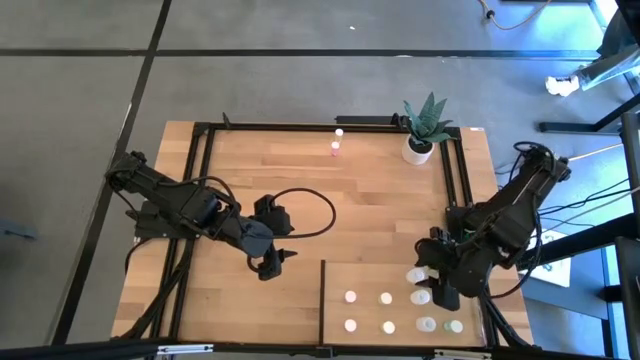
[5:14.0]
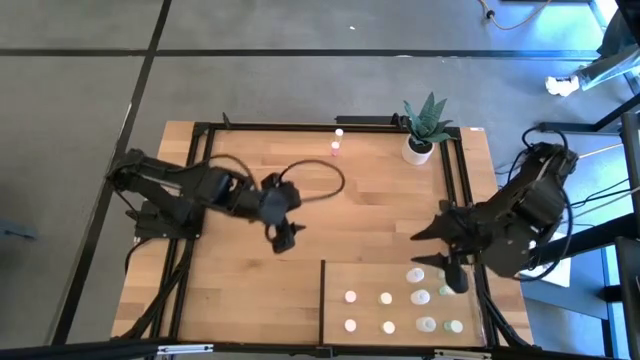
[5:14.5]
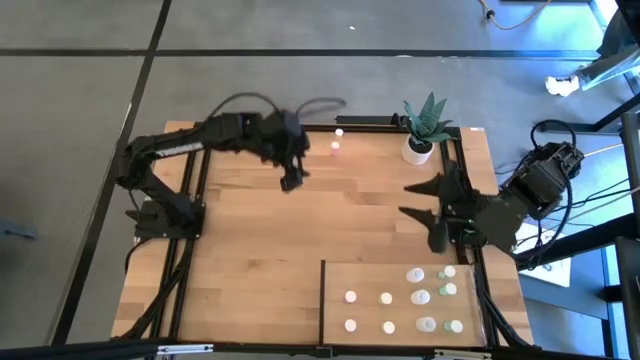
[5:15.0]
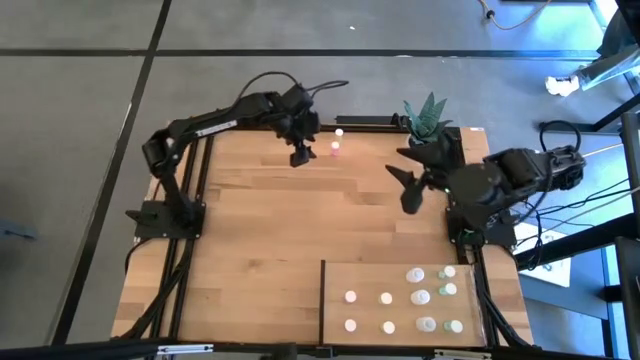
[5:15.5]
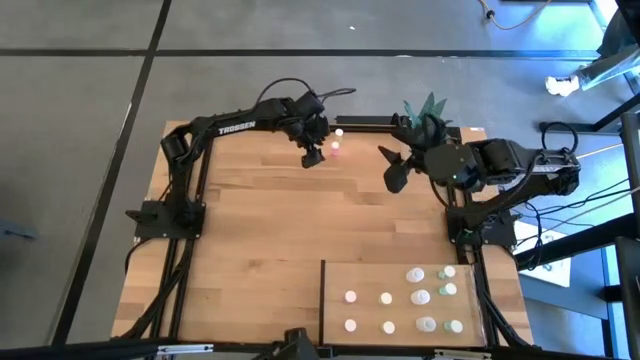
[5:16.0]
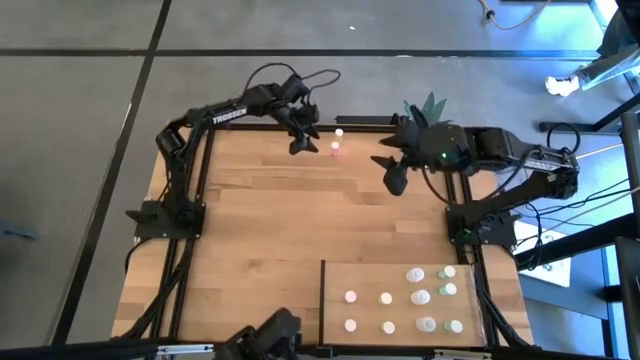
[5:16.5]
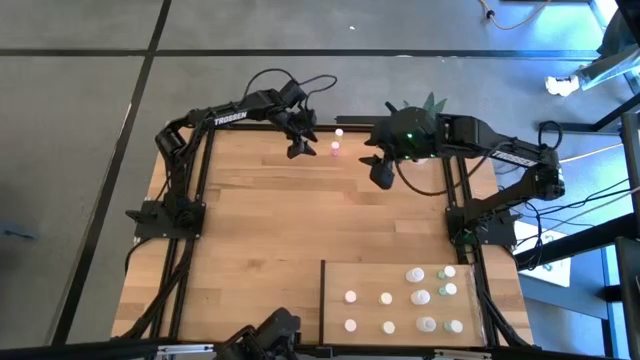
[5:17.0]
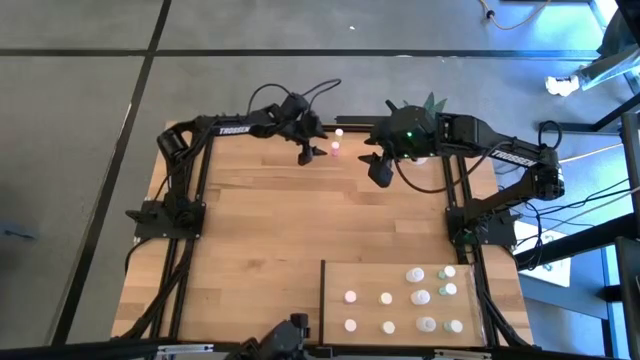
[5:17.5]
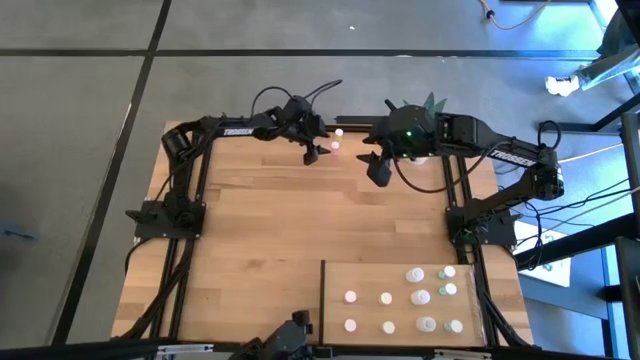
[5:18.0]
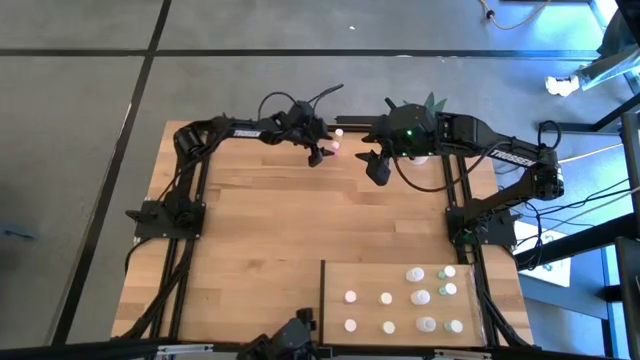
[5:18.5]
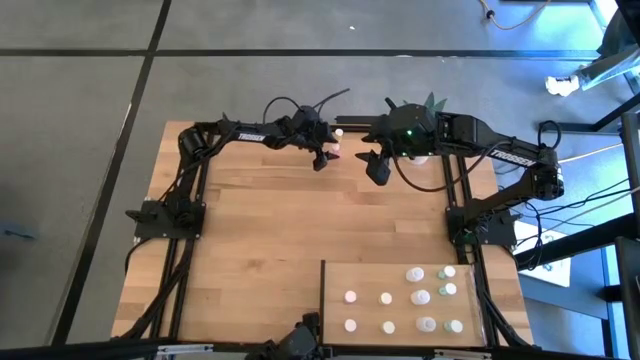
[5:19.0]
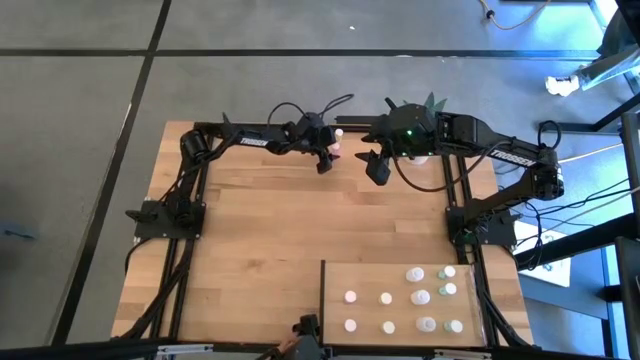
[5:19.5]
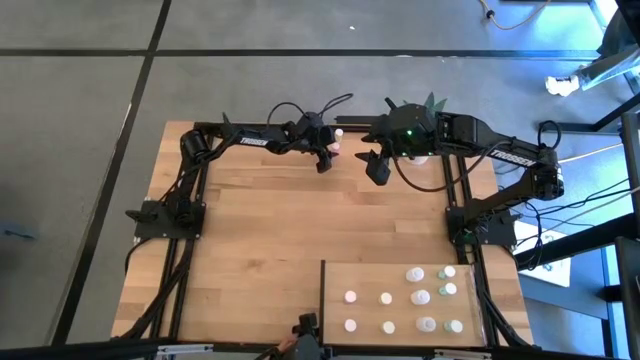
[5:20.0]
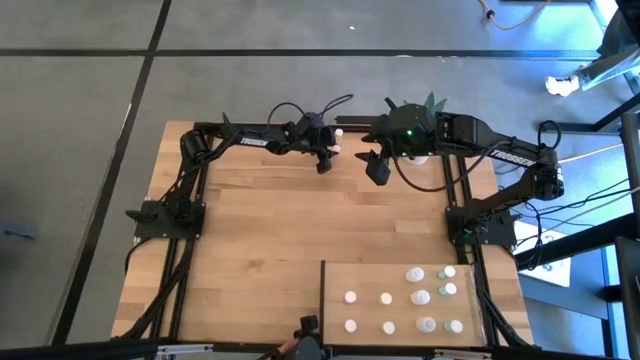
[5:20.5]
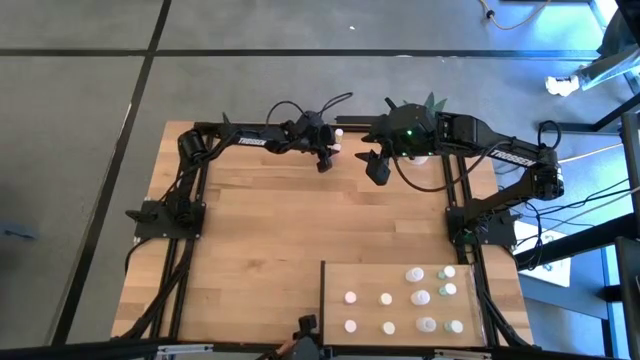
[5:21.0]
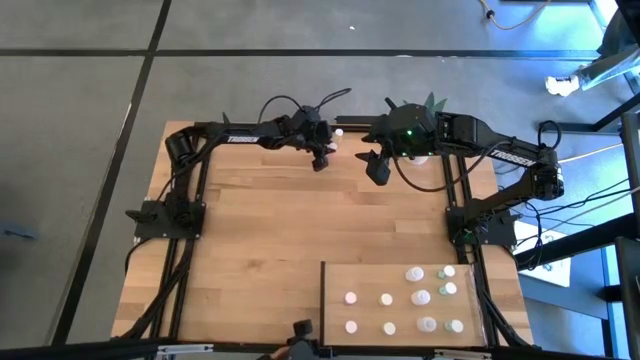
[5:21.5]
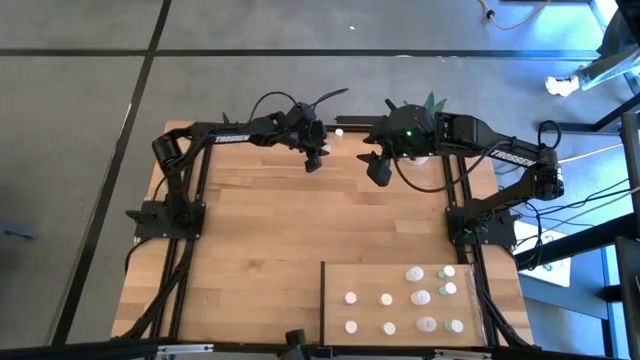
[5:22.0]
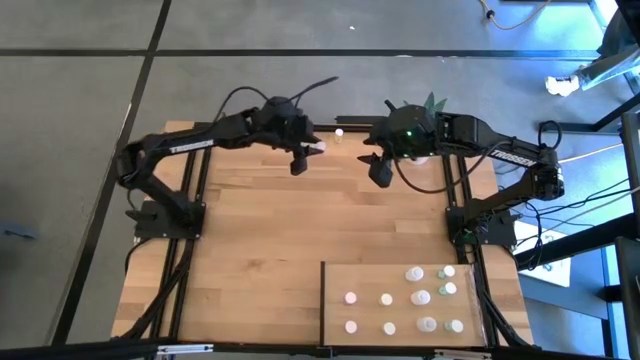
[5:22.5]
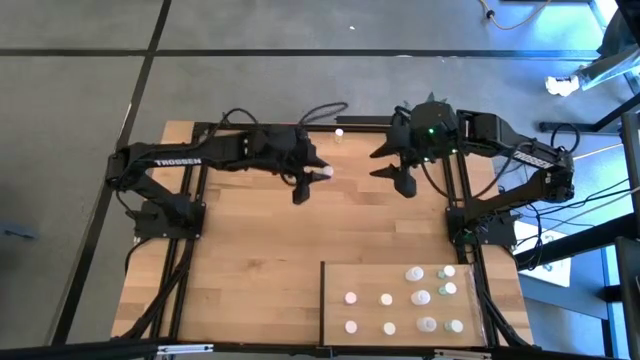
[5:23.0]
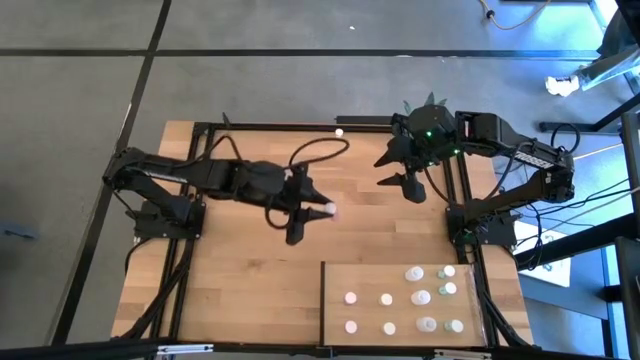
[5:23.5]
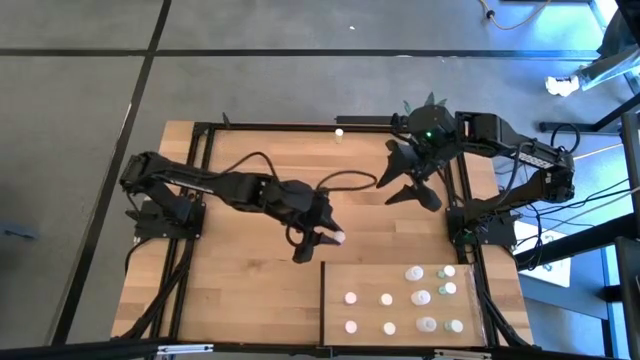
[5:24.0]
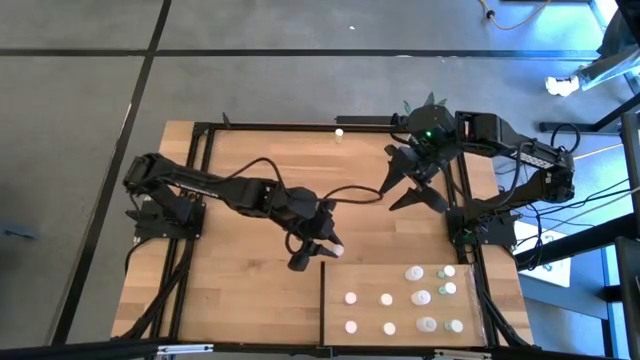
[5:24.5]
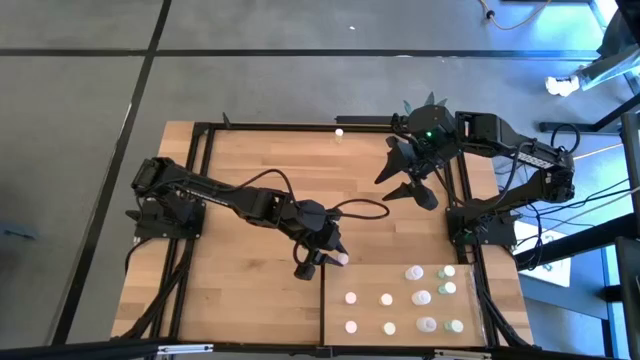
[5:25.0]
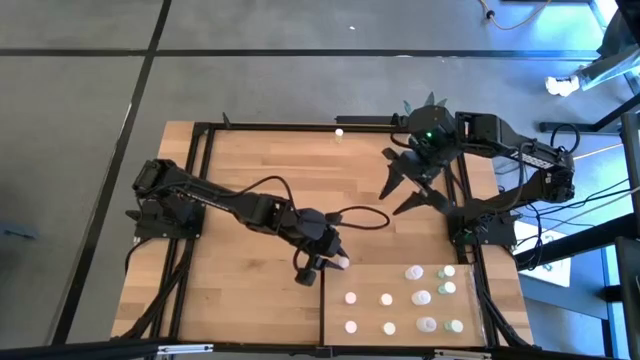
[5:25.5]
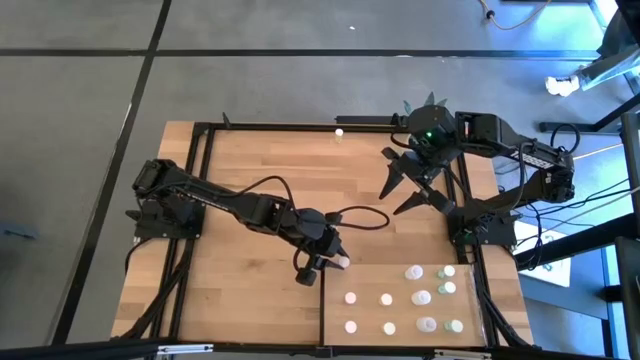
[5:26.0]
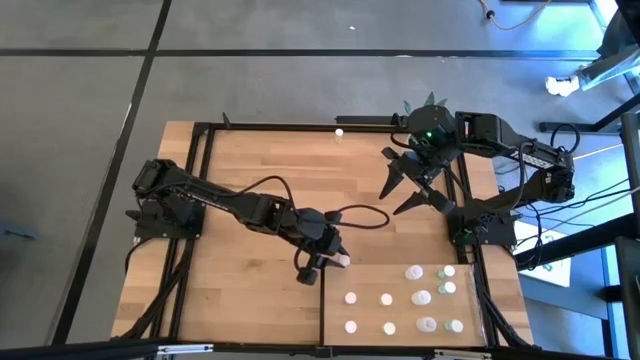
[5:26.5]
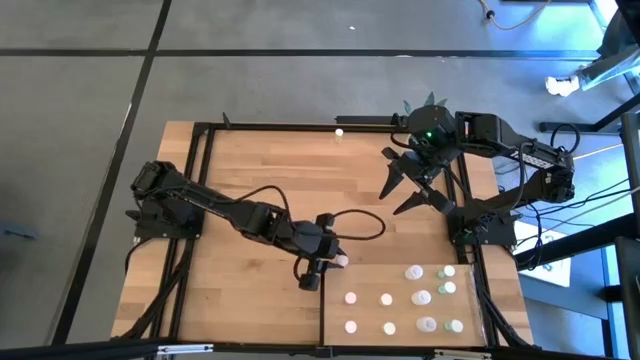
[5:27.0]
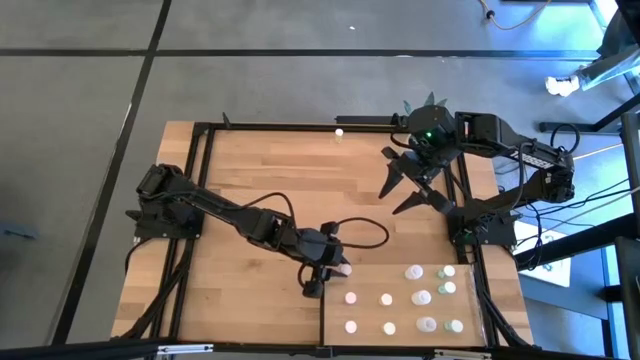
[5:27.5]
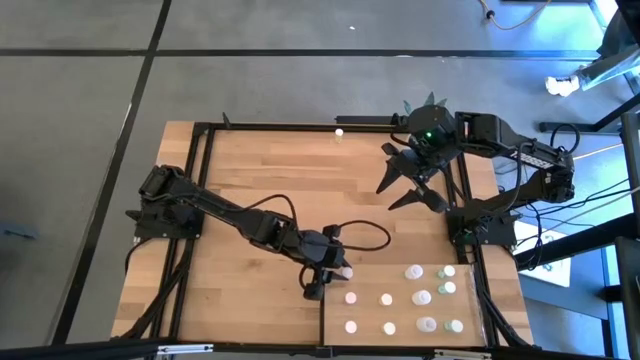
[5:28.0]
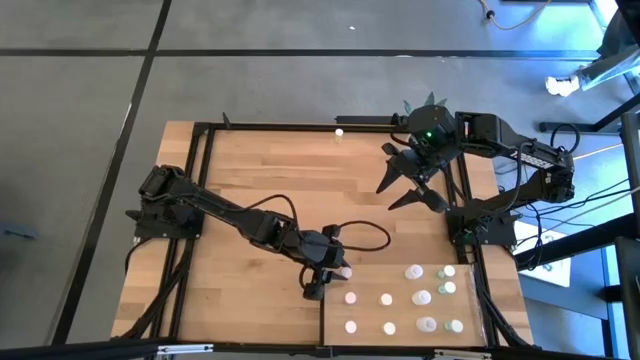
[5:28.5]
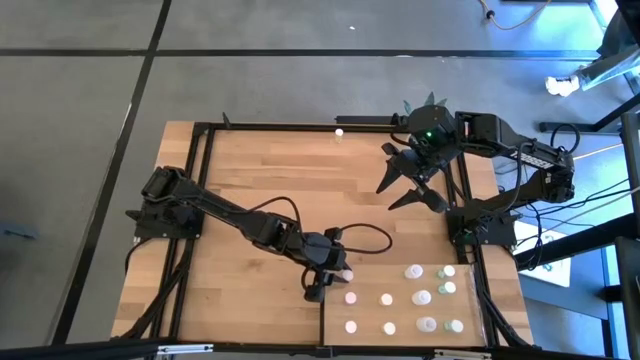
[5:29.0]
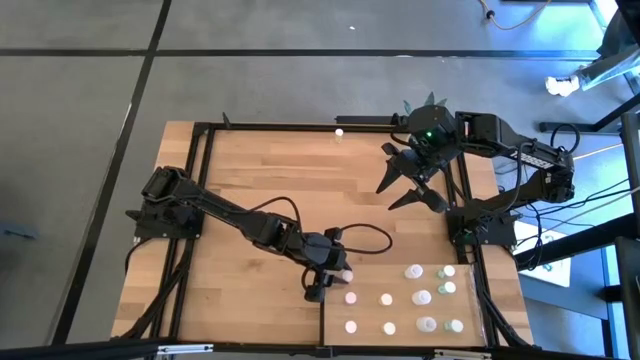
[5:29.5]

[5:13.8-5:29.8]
Task: Pick and place medicine bottles onto shelf by color
Put the pink pill bottle on the shelf aligned with the other pink pill bottle

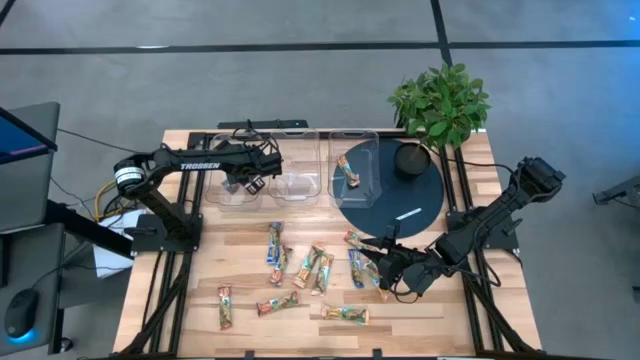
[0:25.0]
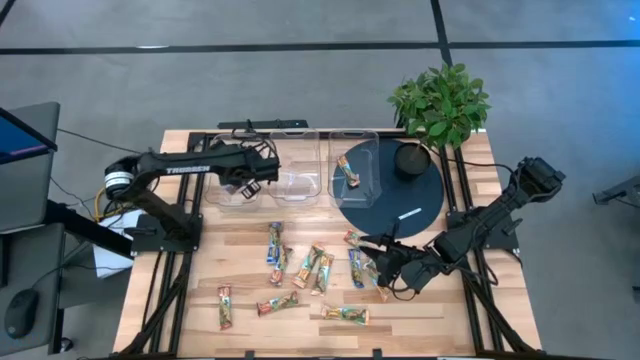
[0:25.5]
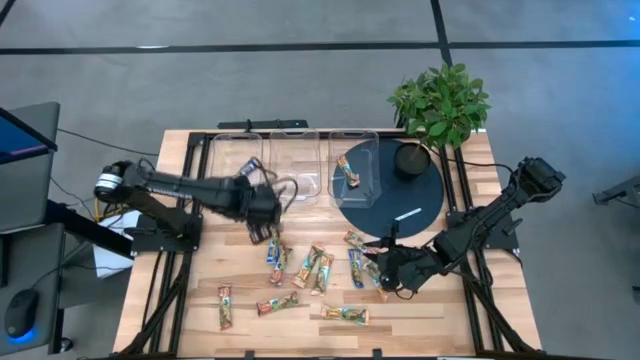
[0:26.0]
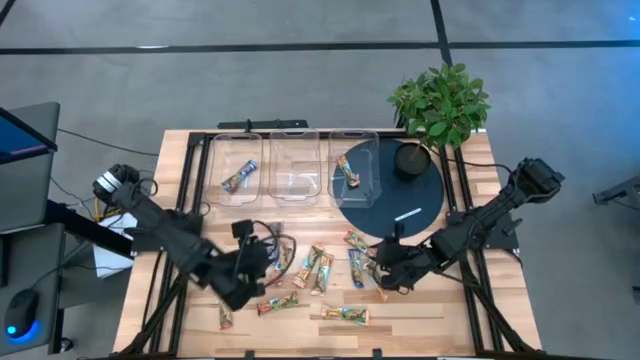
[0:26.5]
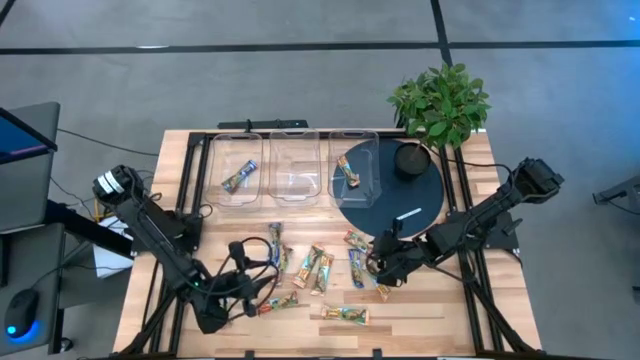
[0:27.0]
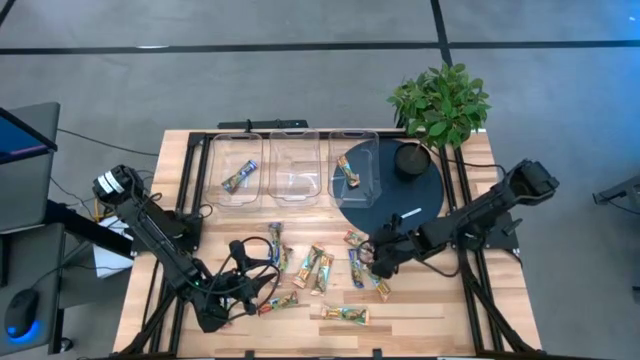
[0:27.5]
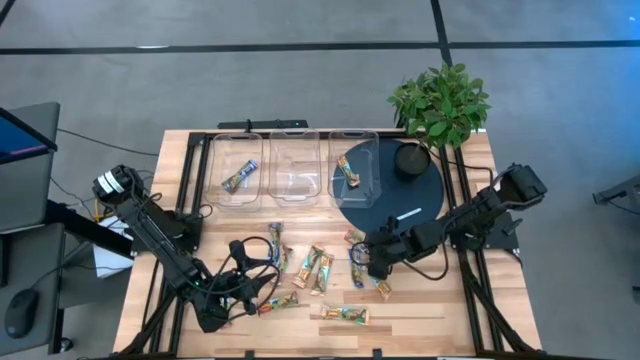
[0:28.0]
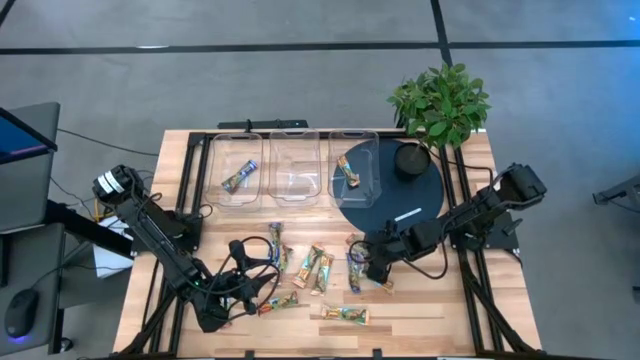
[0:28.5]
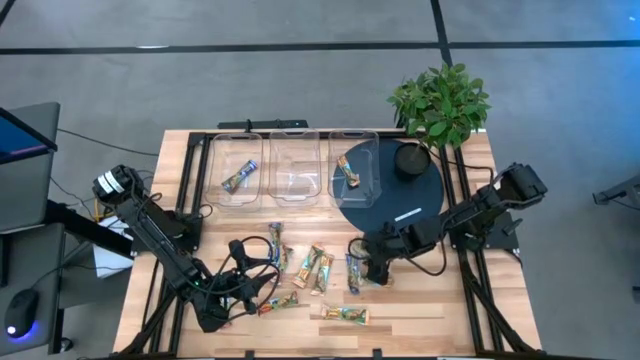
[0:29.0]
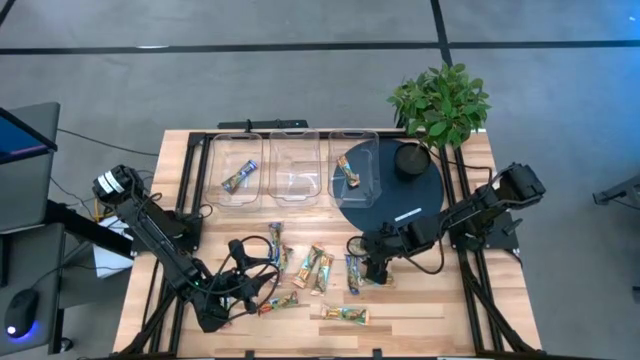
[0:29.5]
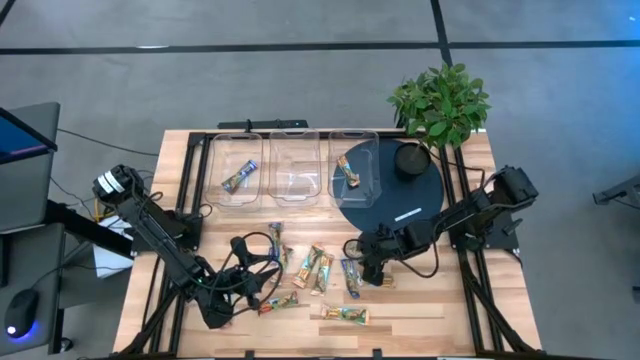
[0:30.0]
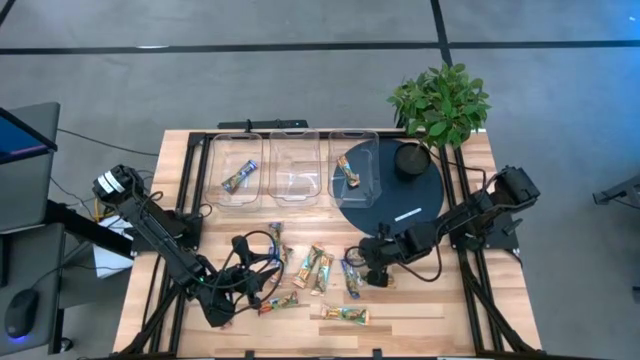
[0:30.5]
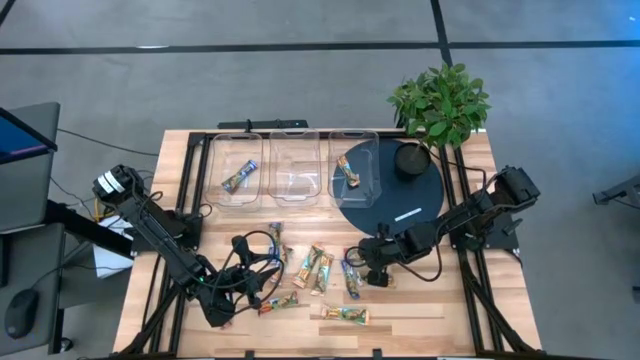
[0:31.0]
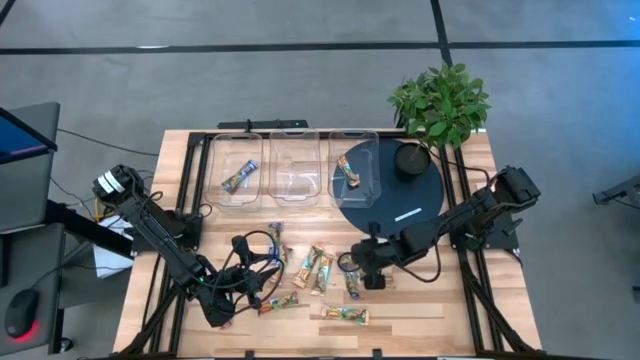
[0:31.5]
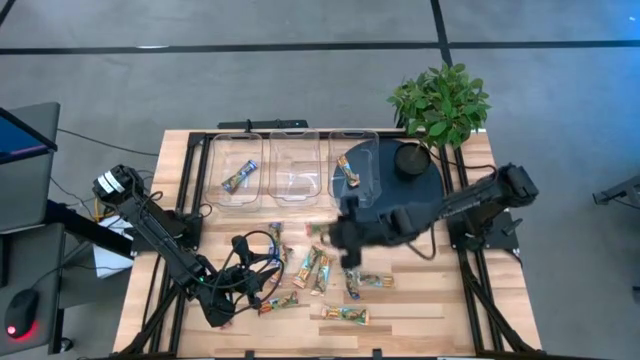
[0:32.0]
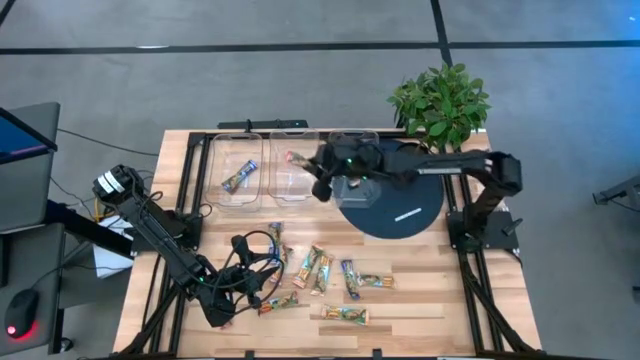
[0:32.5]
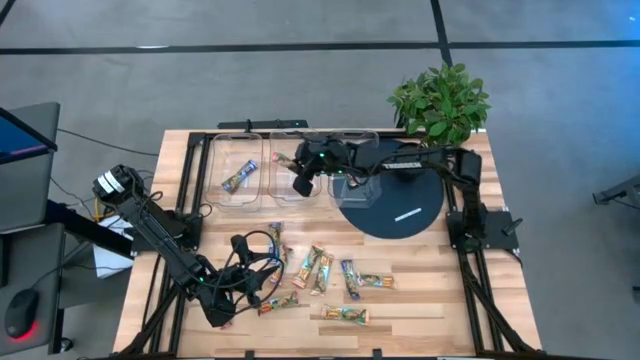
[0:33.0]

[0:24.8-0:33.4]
Task: Pick and place Granola Bars by type
Put the top right red chocolate chip into the center transparent bin
